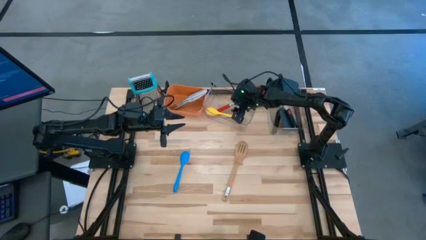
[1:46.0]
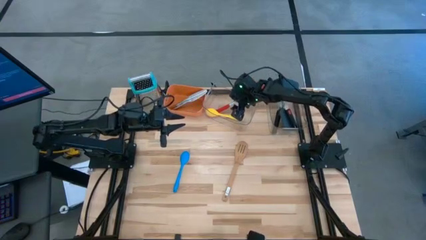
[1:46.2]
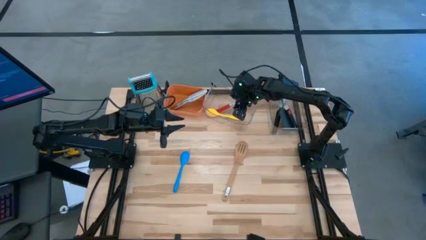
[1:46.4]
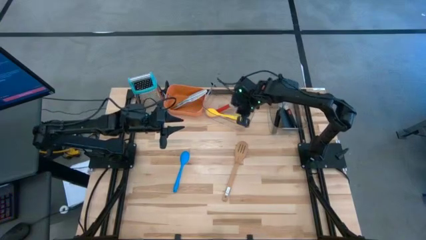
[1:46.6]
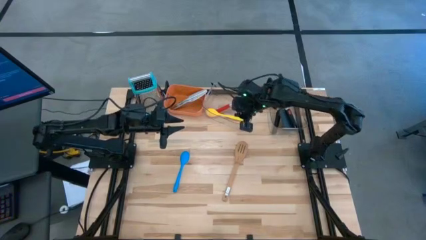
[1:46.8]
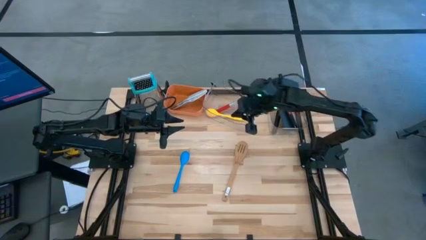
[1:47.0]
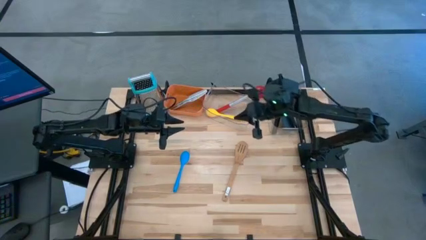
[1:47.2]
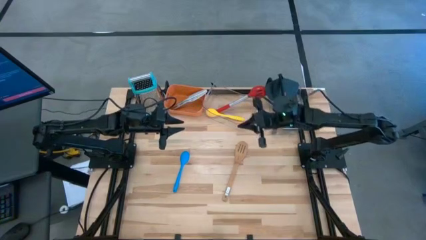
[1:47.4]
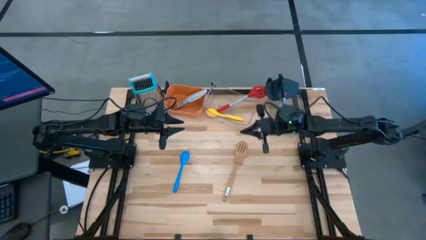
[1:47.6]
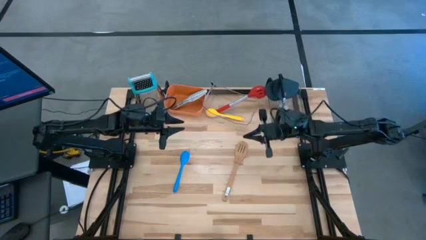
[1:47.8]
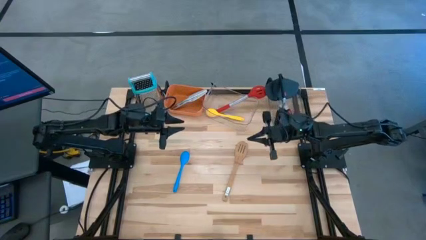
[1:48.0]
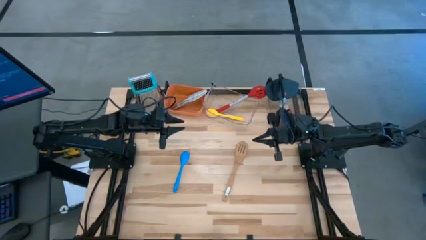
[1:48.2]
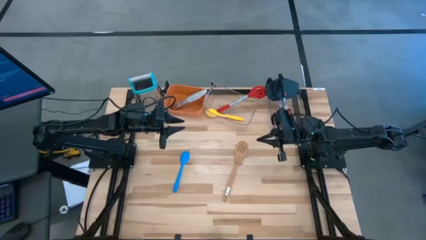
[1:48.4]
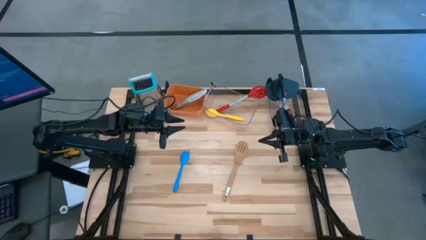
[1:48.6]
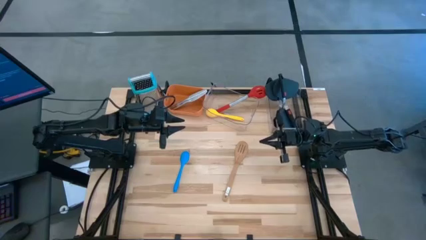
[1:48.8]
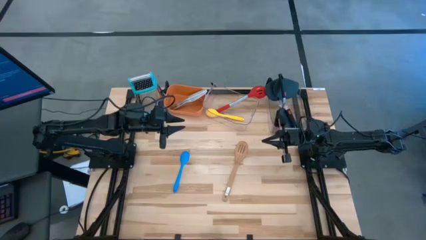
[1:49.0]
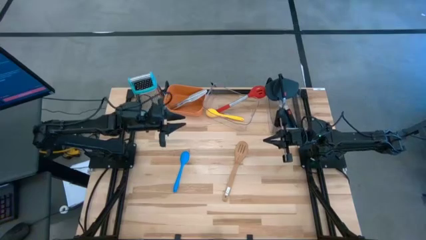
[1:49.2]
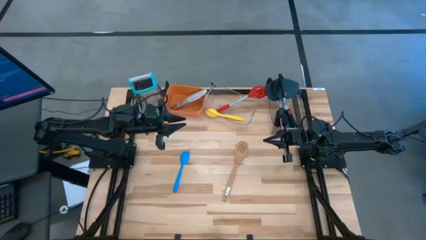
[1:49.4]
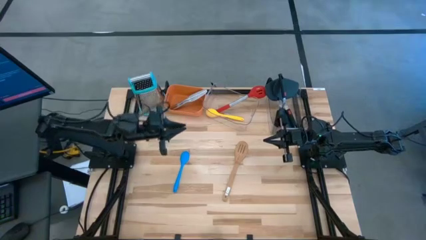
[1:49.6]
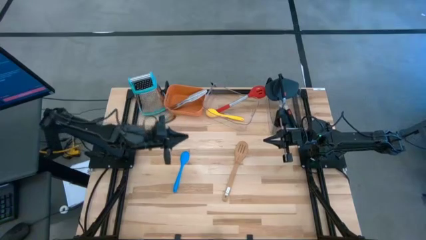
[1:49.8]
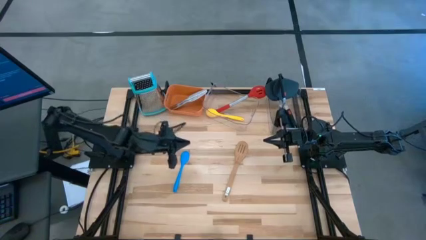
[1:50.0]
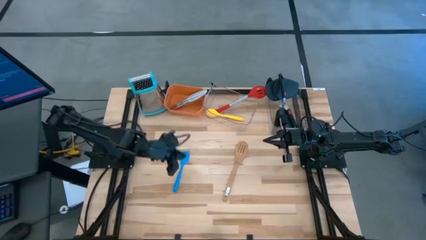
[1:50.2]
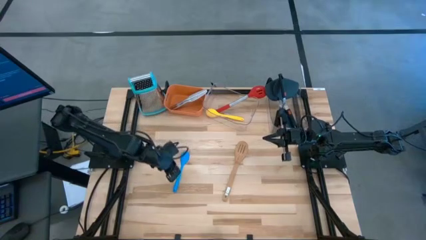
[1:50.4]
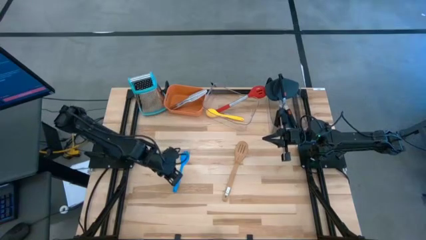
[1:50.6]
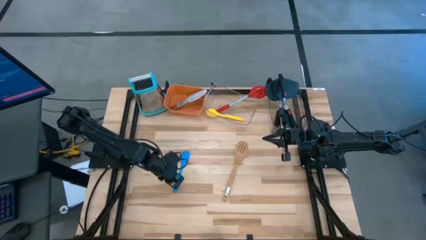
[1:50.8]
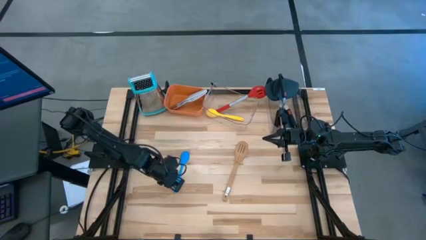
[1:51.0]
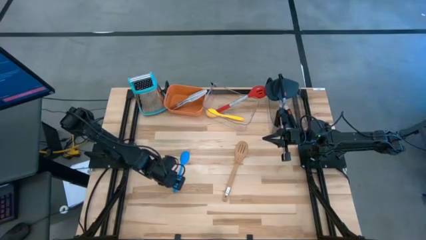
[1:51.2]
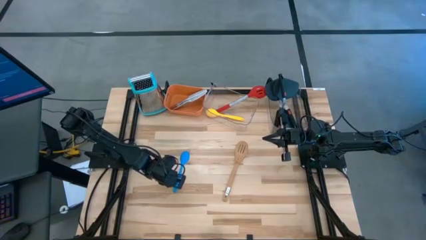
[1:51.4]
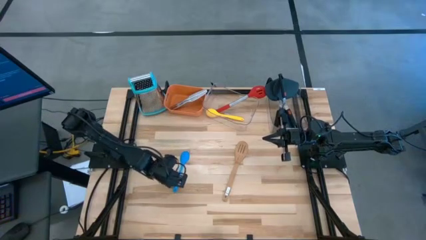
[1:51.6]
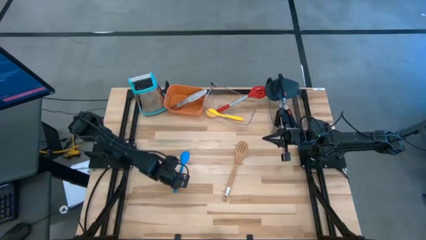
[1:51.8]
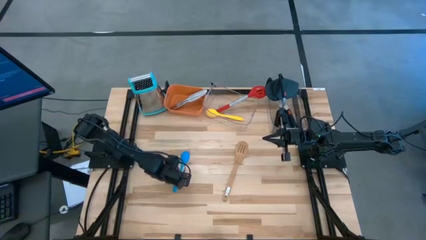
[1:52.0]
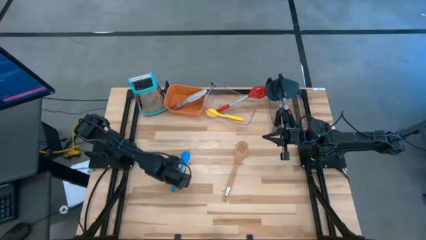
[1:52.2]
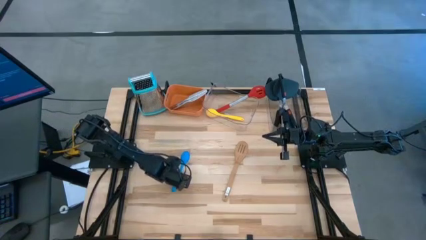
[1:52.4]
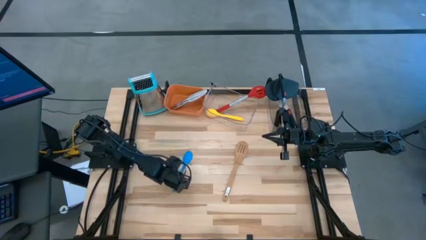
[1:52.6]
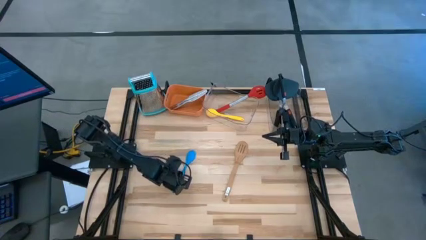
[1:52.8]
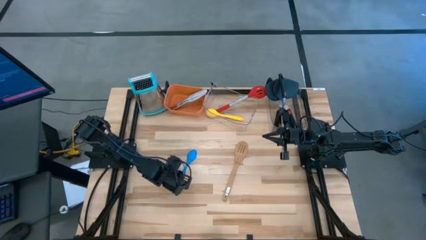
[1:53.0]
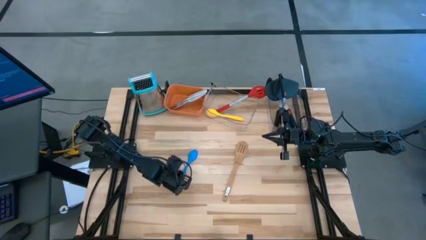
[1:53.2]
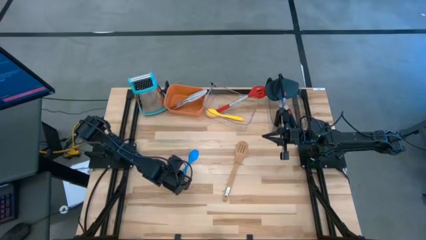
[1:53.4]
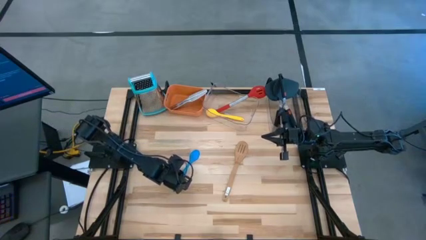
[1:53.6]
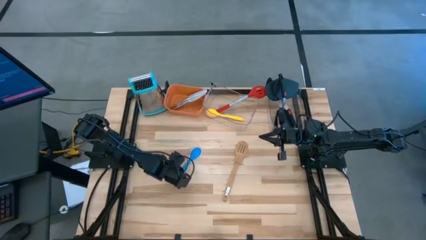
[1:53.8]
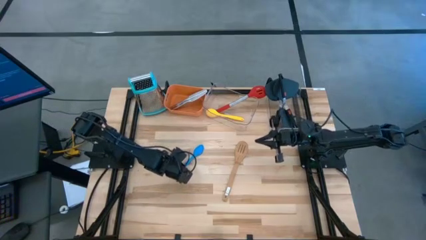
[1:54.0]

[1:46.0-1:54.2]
Task: Pick & Place Kitchen Items
Put the blue serving spoon into the left transparent bin

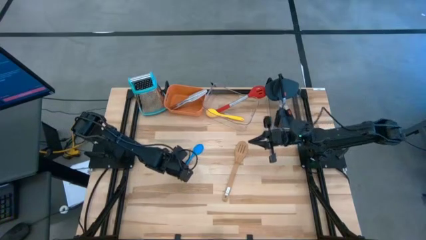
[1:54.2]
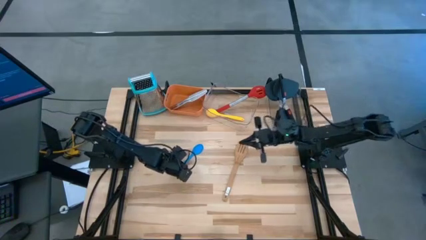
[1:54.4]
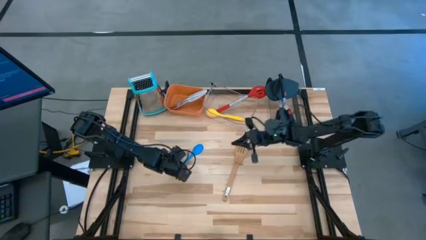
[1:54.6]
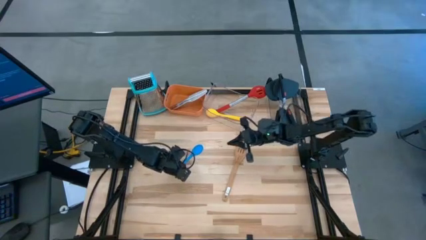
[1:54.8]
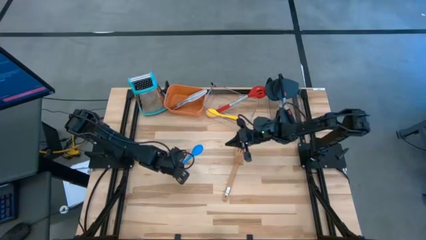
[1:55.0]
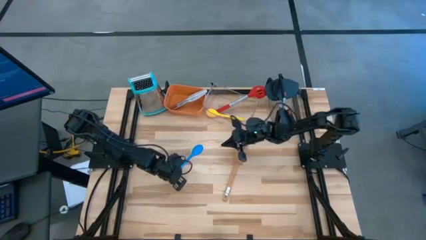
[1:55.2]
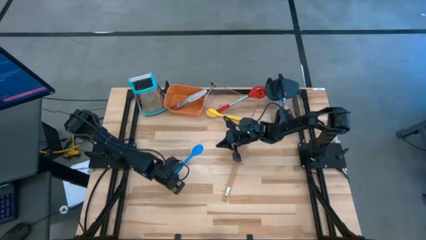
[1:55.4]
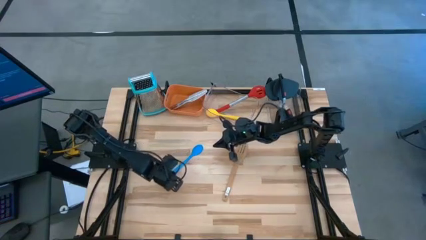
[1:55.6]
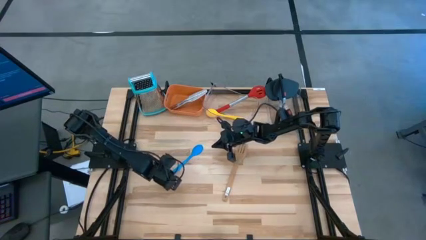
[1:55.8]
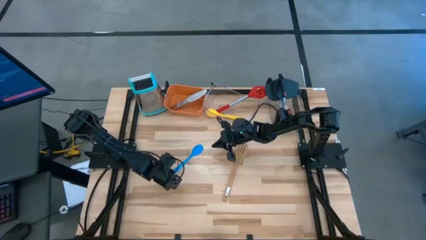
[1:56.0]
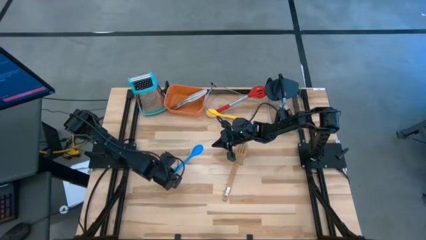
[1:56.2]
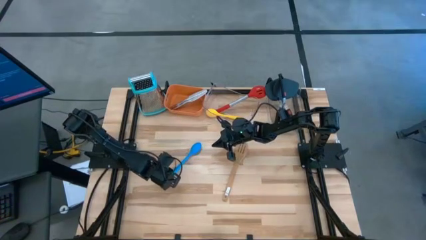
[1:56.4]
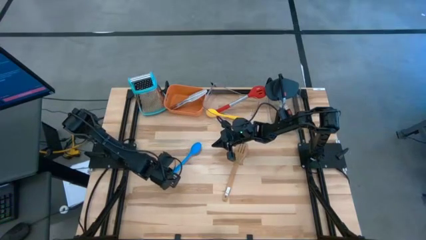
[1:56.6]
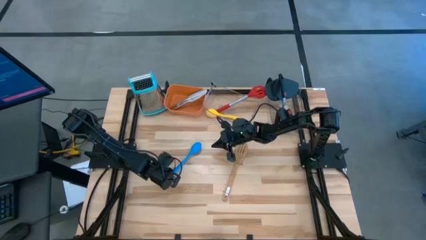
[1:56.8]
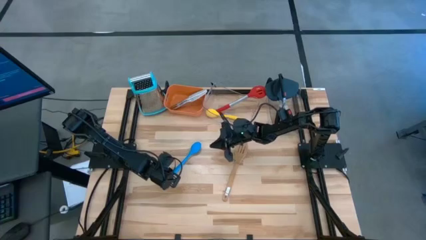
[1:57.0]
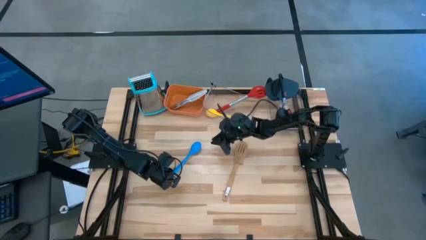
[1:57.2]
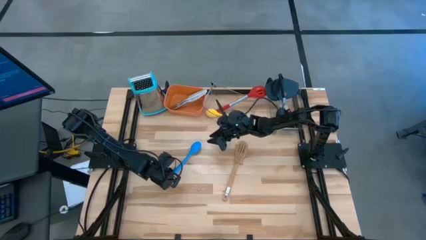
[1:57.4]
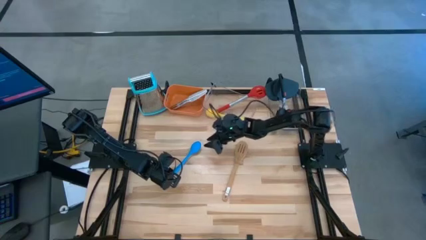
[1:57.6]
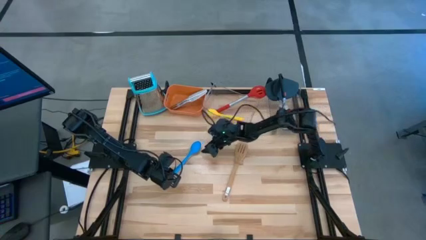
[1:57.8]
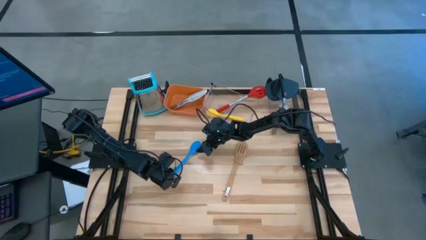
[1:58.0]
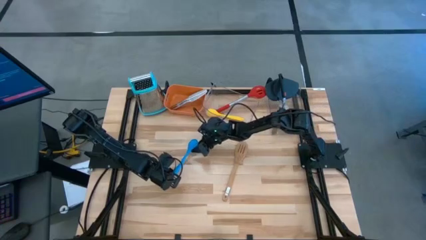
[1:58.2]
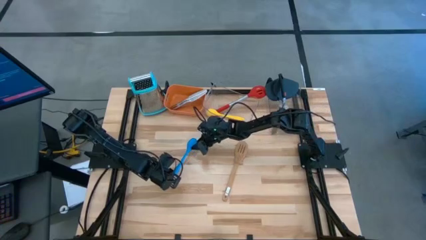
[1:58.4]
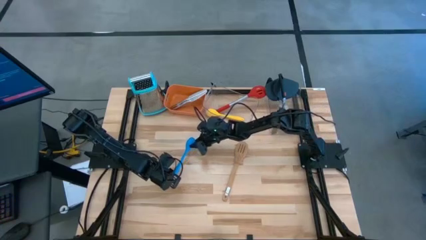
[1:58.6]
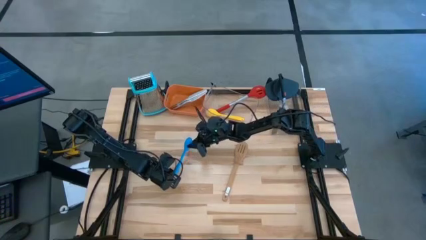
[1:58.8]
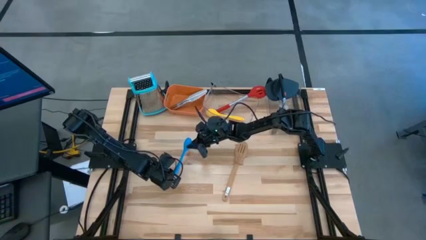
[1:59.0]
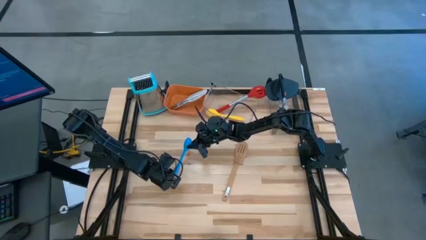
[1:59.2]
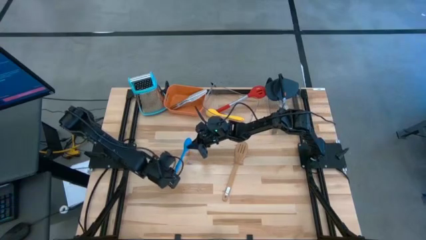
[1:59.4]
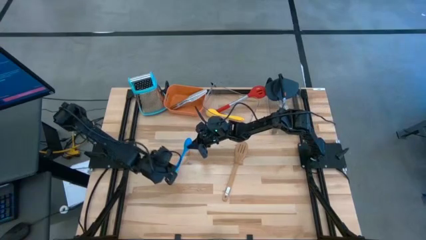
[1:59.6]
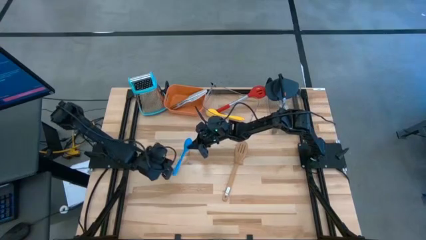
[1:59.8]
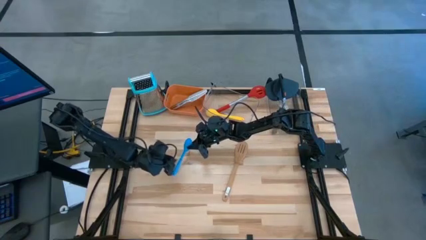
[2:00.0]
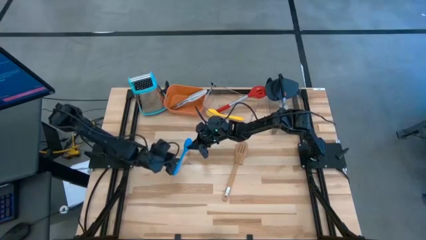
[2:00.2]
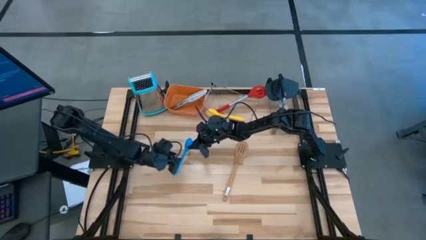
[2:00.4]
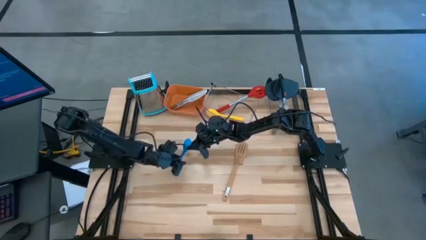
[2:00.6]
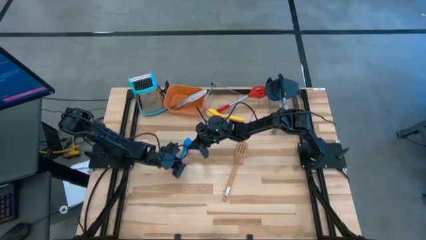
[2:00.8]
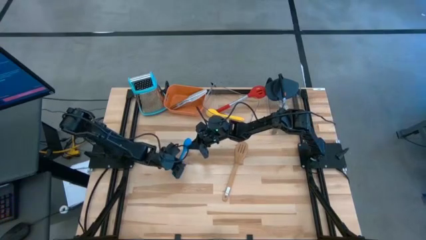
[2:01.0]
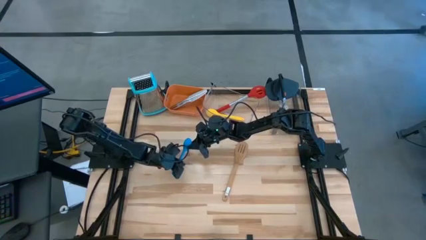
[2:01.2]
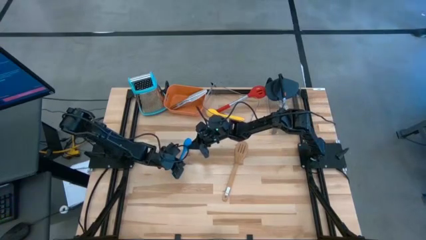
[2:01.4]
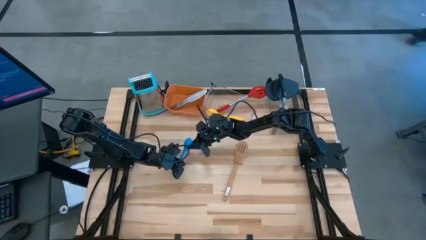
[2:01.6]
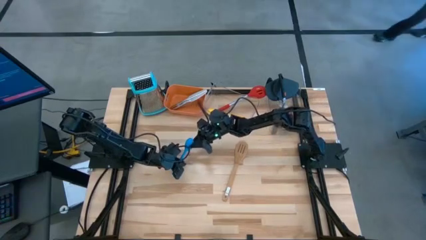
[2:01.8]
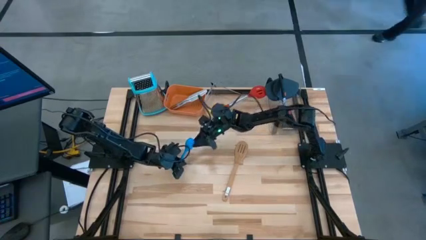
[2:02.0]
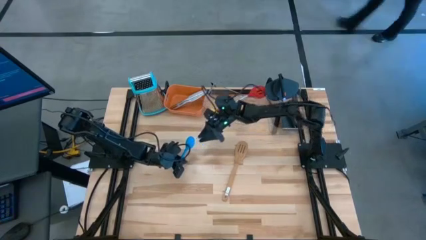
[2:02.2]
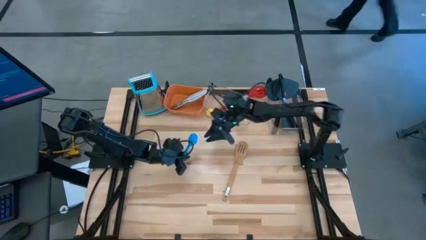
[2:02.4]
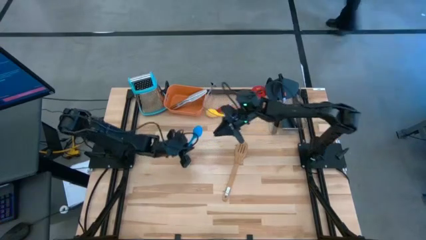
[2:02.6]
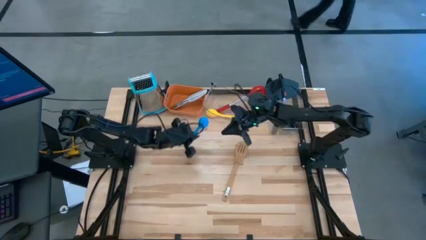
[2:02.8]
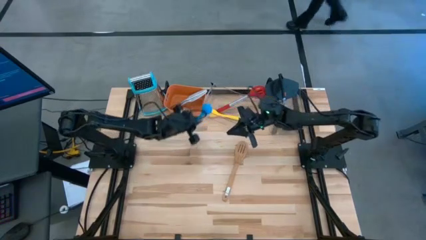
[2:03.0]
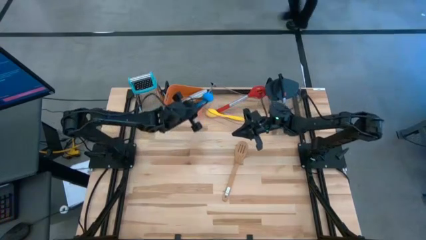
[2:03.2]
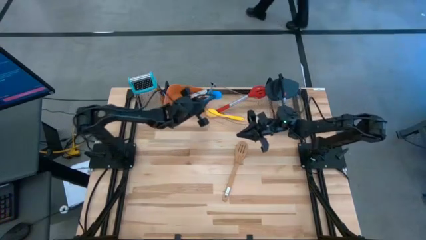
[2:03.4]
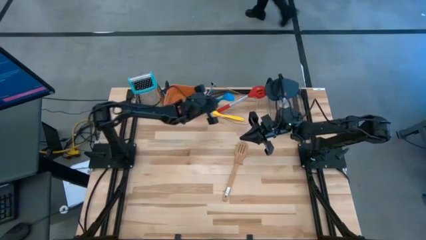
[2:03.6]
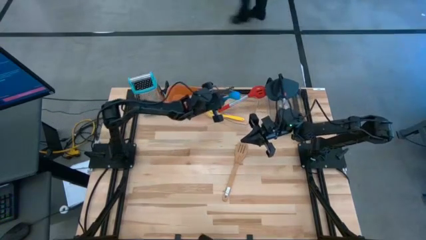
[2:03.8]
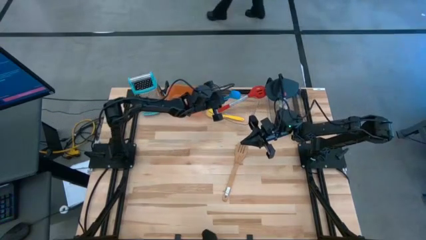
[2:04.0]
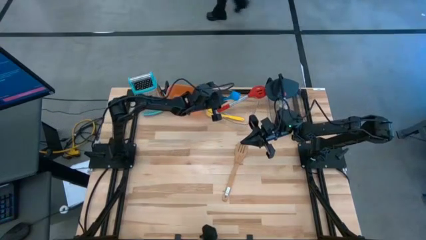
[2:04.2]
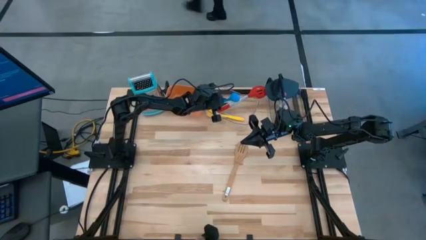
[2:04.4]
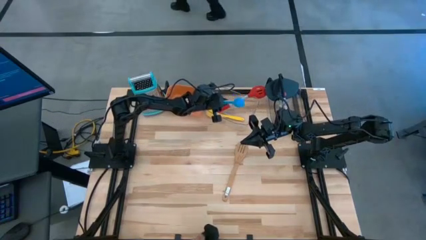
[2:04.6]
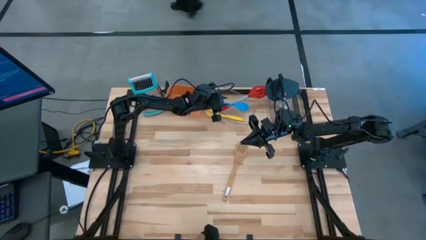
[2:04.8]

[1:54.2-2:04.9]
Put the blue serving spoon into the left transparent bin
